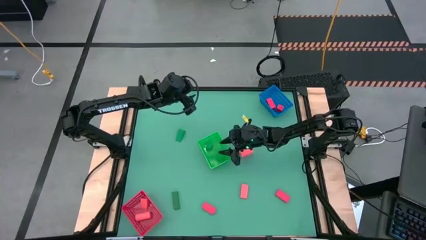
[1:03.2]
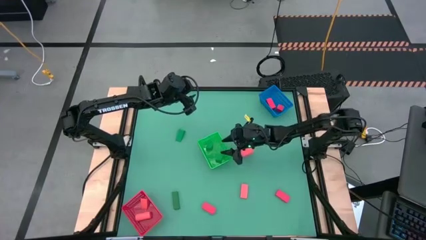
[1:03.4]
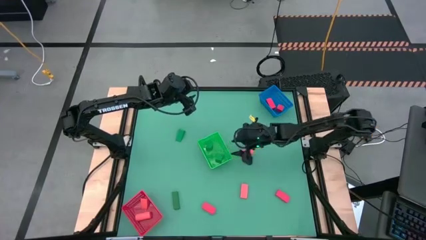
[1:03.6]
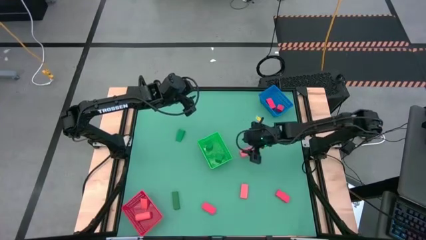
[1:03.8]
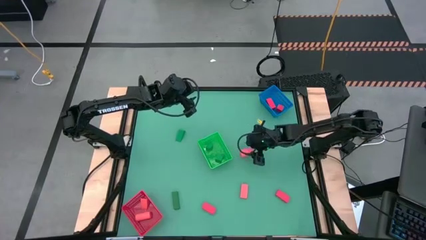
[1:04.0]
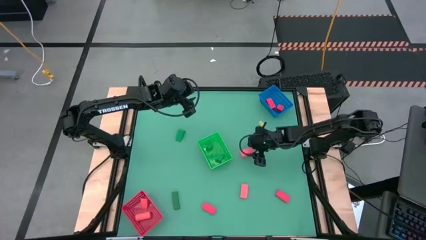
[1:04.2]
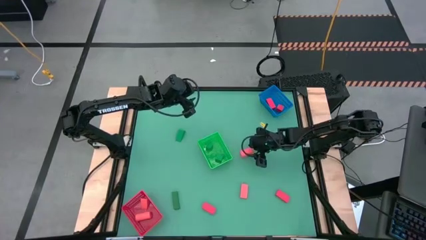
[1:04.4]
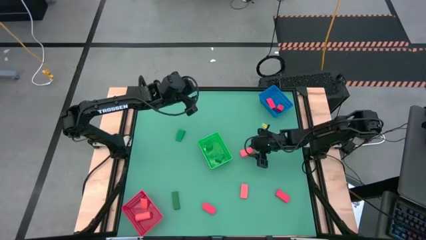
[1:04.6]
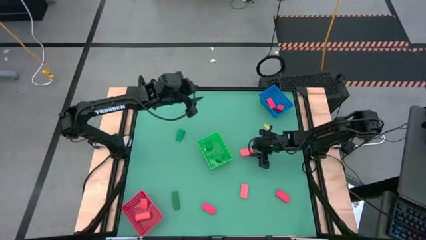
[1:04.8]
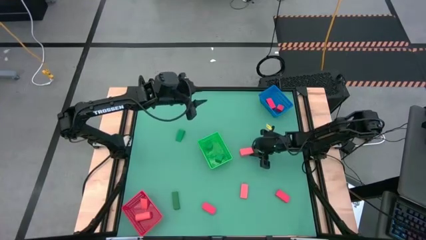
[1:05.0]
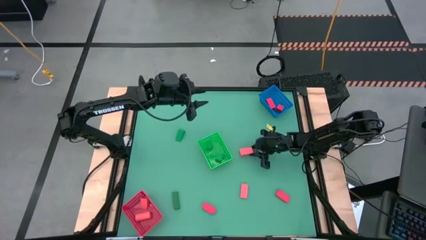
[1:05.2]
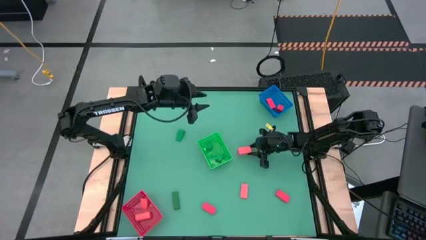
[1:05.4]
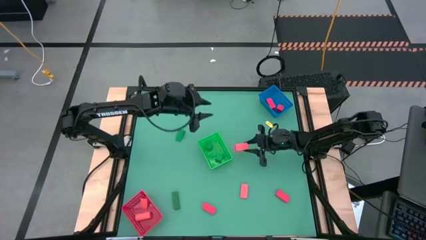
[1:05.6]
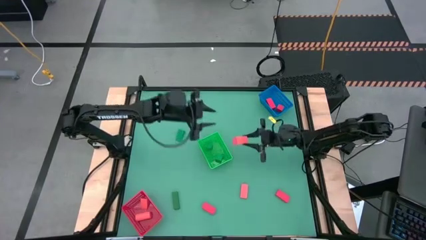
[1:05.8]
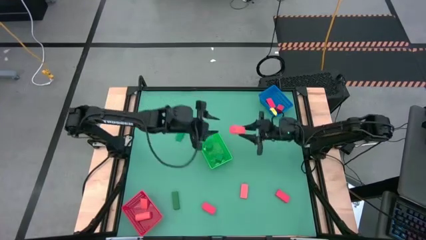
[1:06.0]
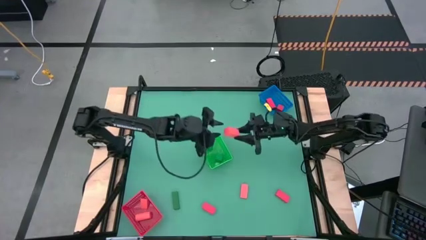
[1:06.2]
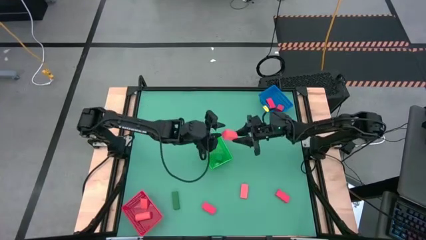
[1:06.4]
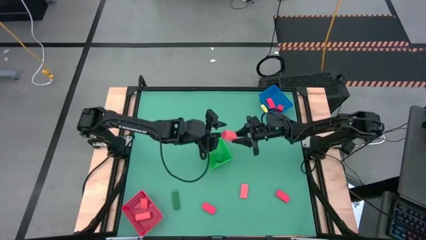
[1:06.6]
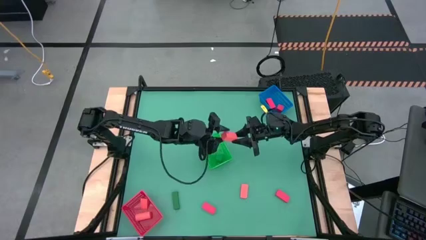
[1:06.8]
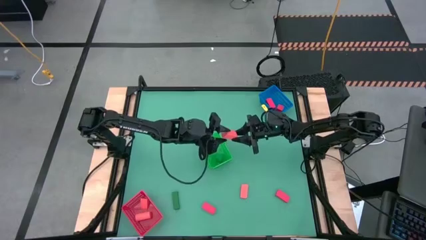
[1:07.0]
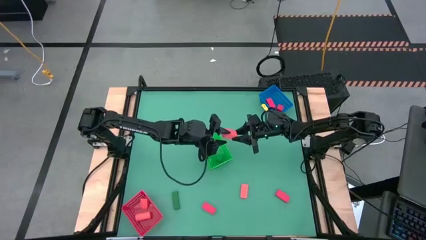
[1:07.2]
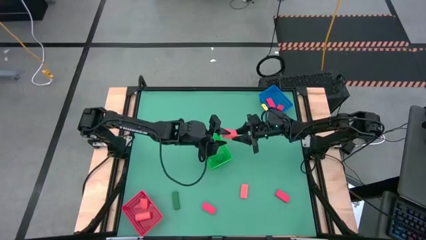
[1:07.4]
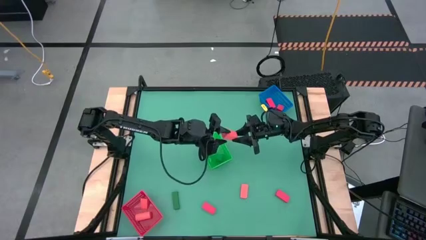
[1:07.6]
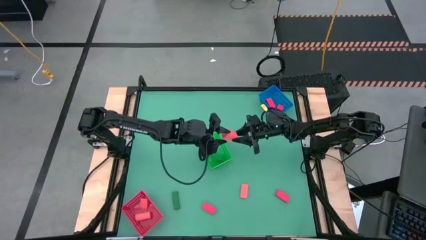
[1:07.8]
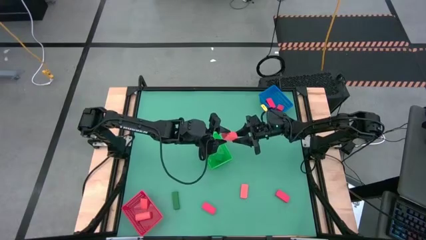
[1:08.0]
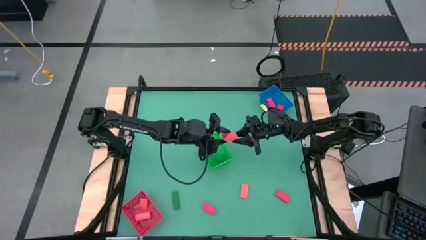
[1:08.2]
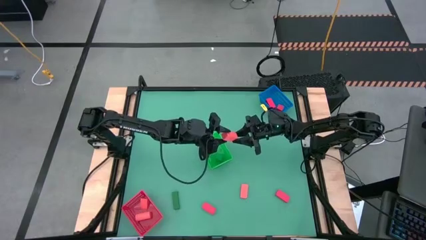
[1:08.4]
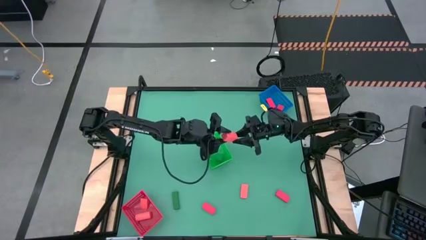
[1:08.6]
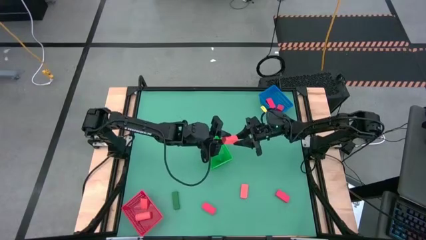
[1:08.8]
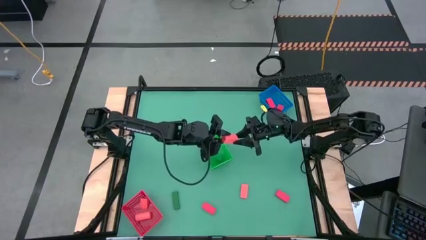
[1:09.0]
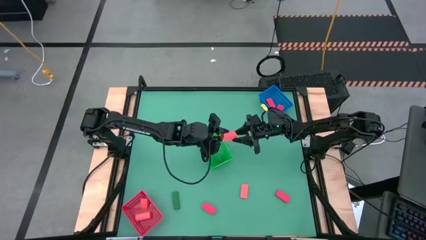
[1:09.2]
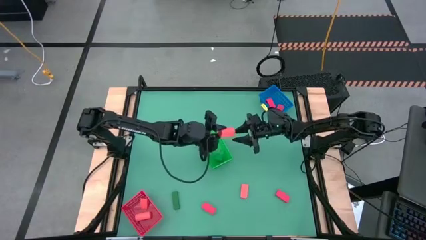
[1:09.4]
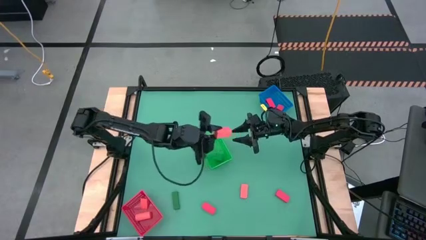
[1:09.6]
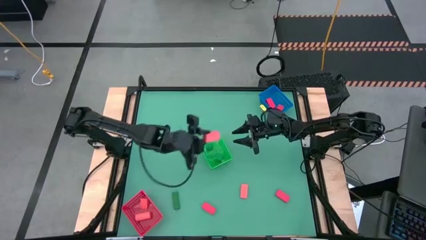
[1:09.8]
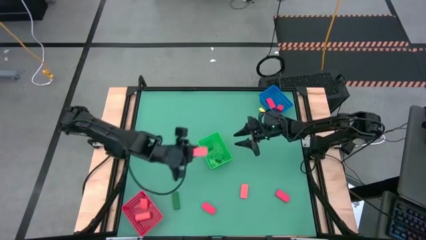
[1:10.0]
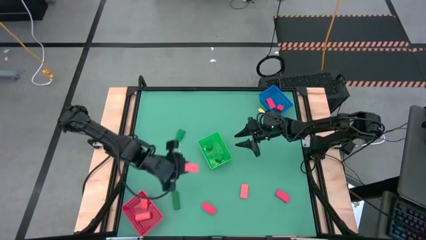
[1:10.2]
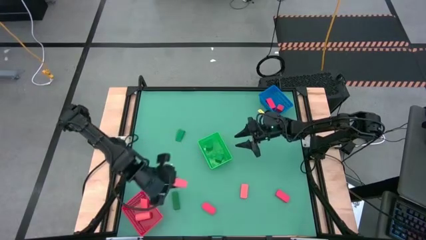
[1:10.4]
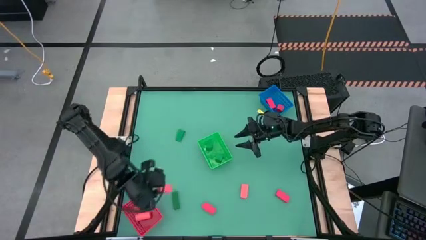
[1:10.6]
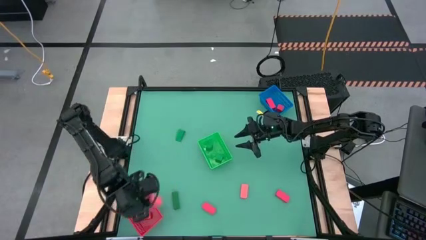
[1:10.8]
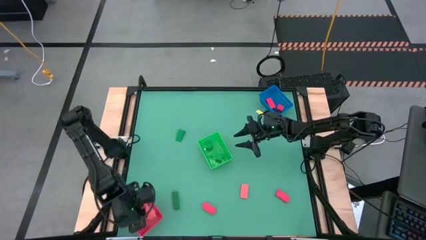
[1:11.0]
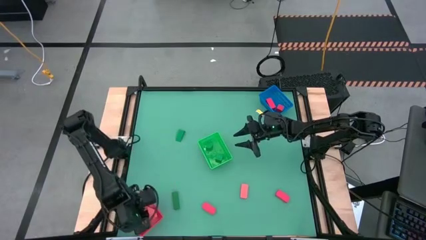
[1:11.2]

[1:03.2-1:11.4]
Task: Sort & place blocks by color
Put the pink block into the red bin

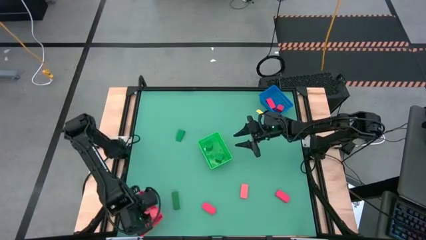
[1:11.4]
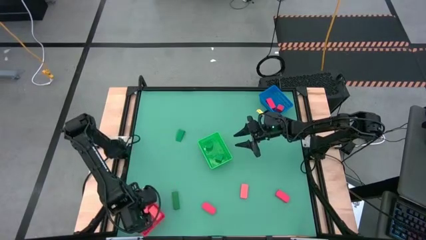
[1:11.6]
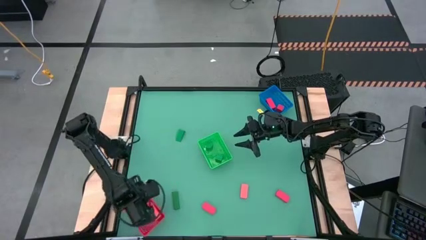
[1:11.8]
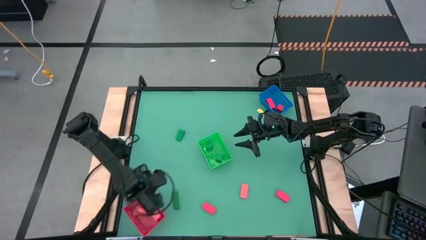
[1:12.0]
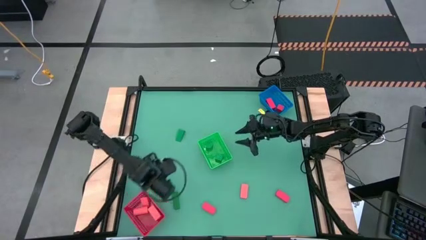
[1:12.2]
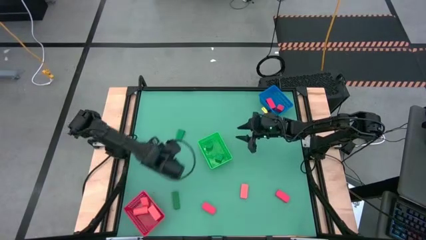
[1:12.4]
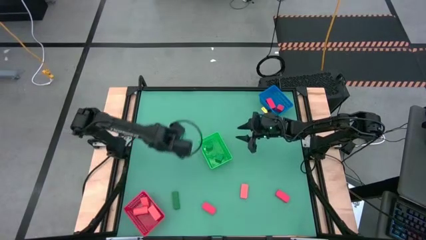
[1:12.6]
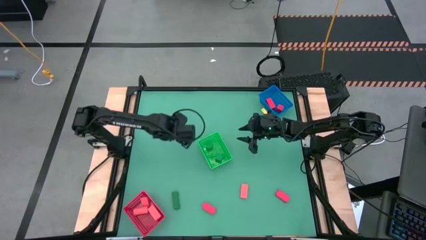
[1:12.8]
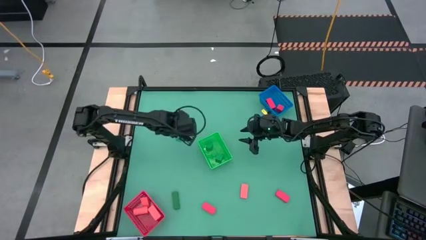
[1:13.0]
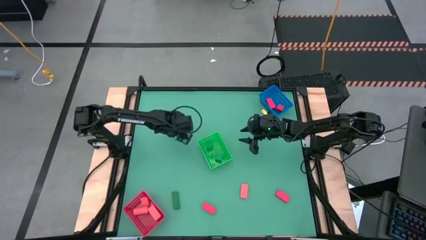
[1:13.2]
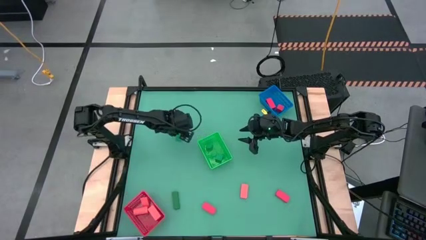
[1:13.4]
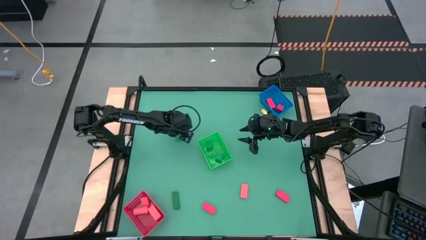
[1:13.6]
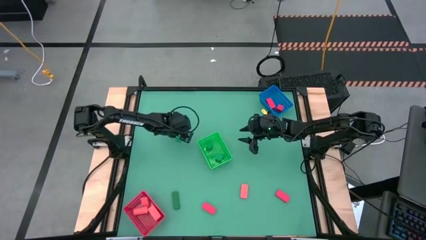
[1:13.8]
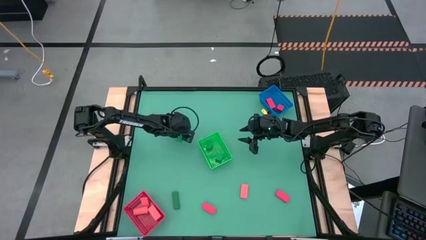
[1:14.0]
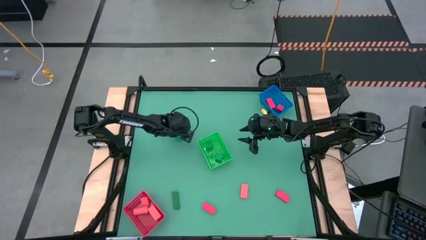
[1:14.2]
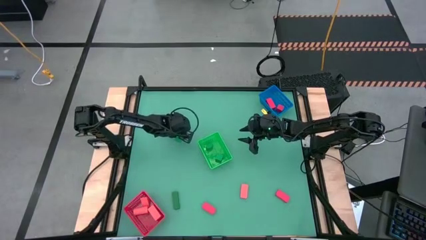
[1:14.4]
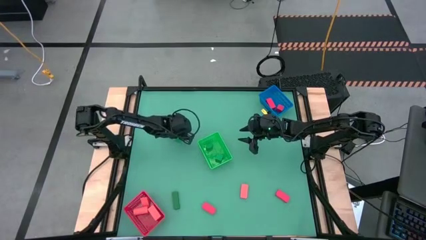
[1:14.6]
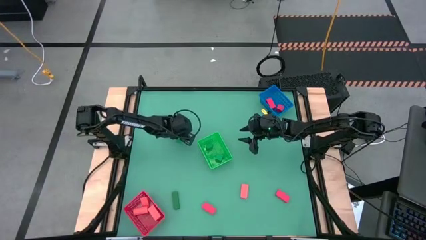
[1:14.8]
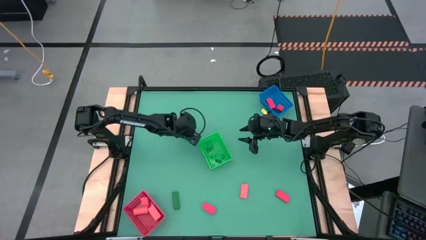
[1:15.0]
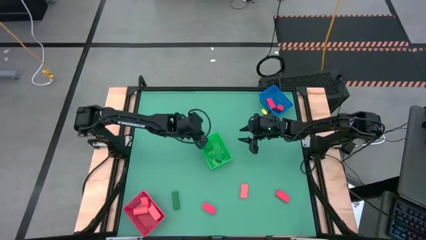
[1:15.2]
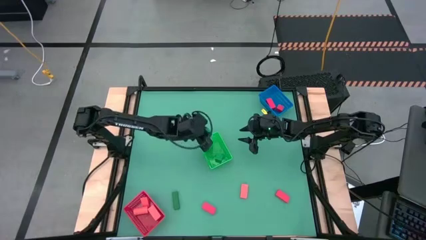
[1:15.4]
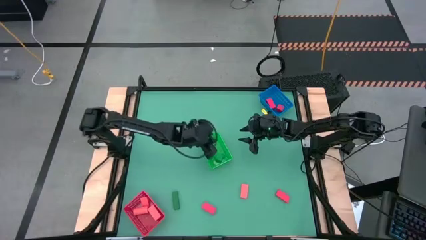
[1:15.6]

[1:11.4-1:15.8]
Put the green block into the green bin

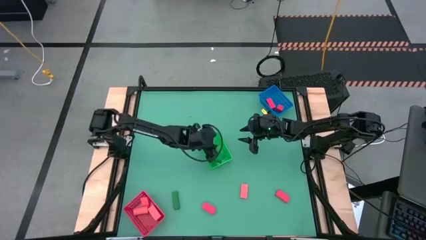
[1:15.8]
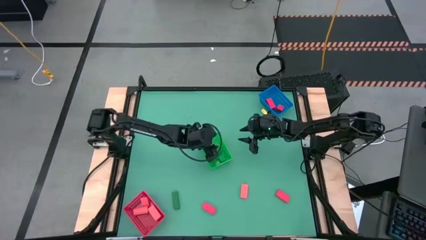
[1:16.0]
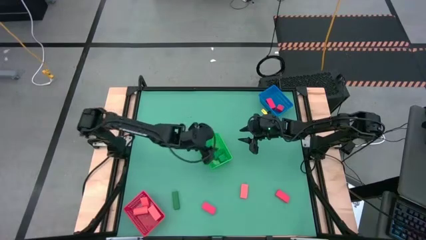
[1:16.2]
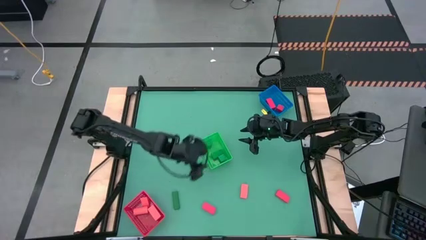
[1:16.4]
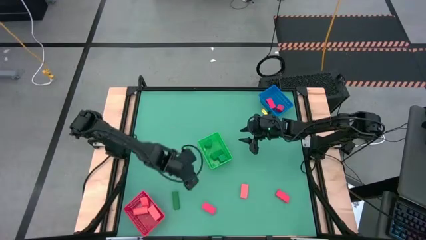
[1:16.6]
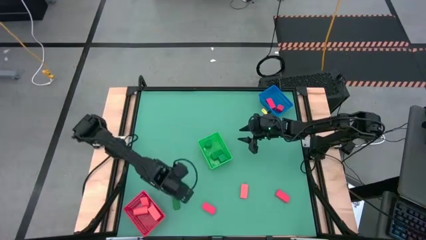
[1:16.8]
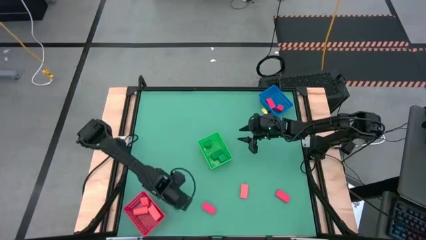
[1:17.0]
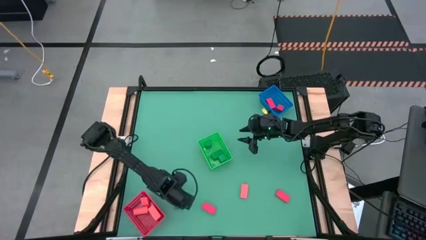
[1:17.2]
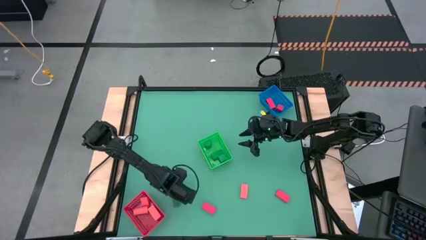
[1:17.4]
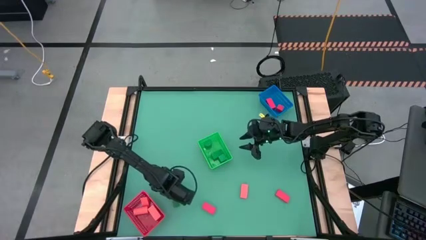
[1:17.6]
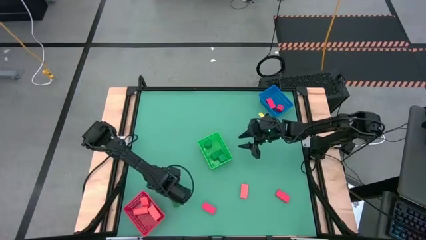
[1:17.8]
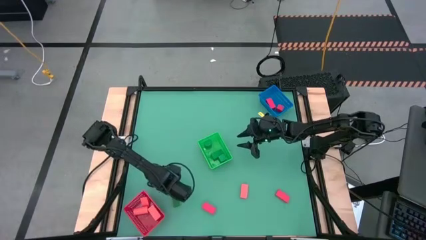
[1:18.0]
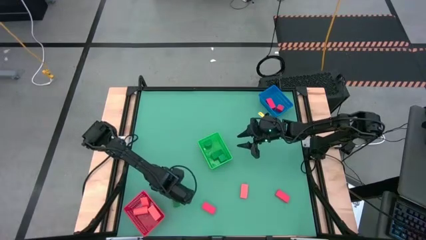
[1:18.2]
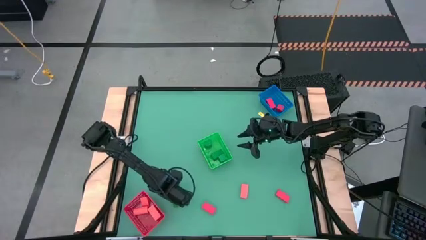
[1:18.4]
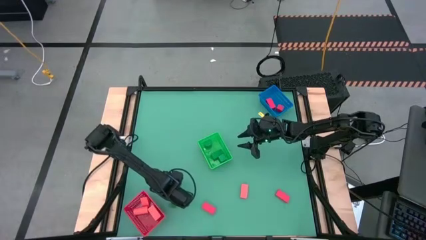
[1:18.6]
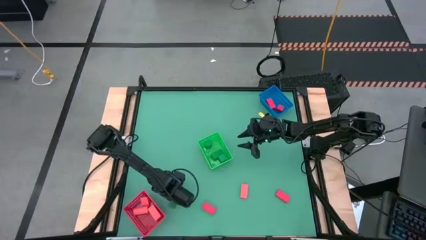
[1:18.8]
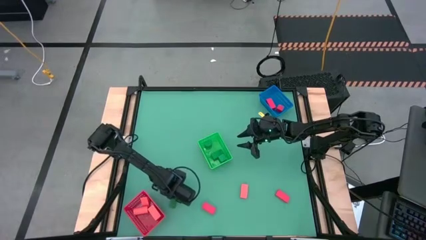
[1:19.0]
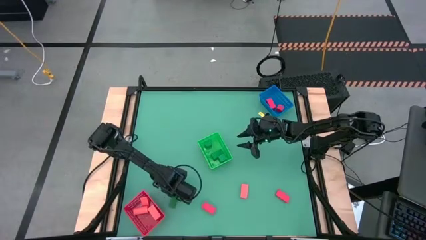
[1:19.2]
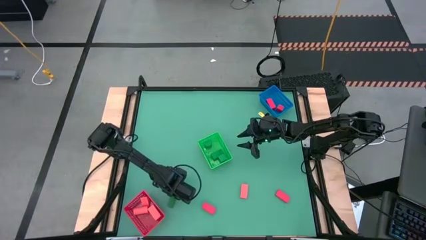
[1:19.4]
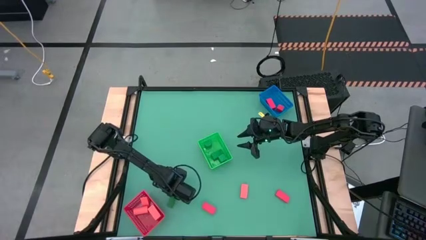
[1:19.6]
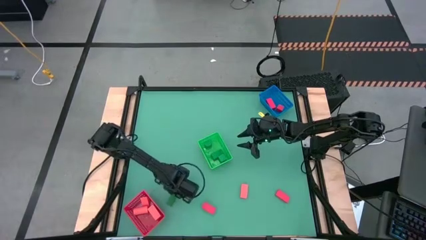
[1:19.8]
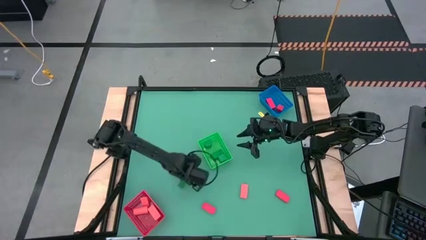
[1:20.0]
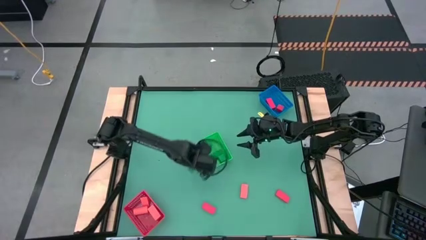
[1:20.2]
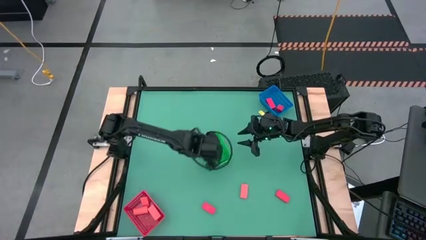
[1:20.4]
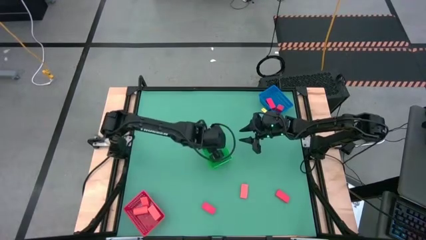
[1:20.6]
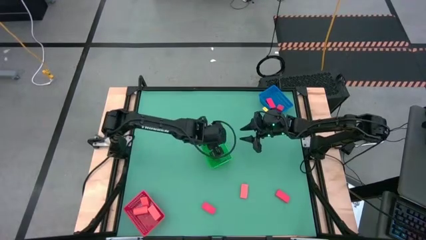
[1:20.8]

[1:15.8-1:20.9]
Put the dark green block into the green bin
